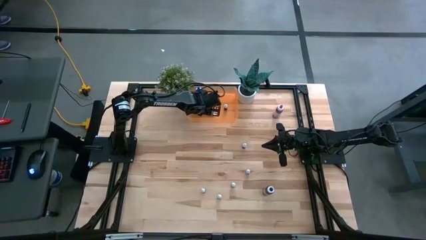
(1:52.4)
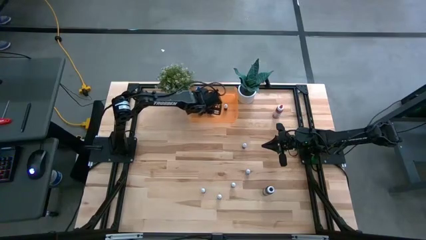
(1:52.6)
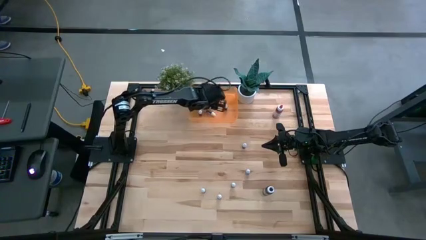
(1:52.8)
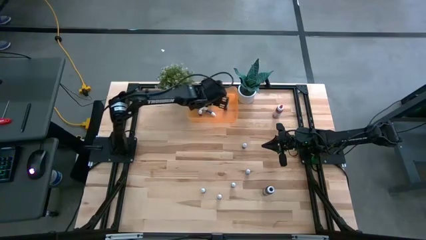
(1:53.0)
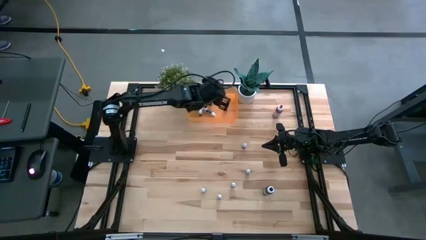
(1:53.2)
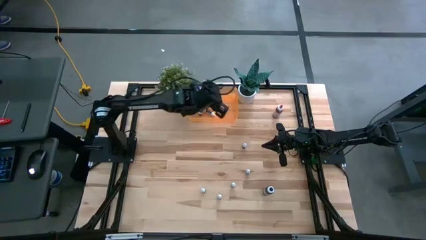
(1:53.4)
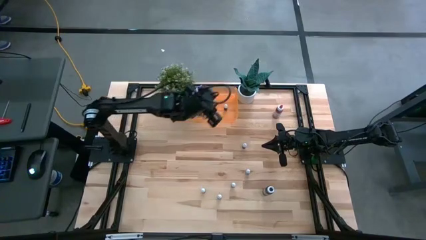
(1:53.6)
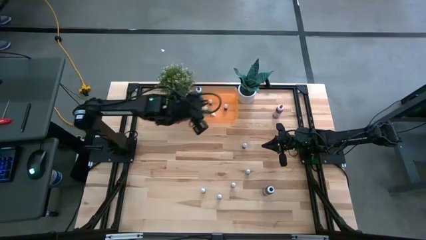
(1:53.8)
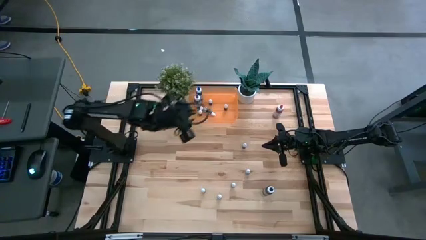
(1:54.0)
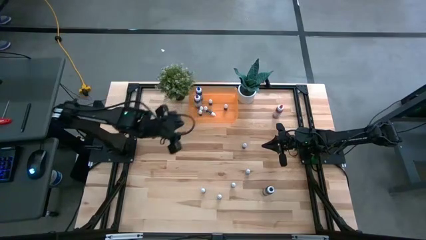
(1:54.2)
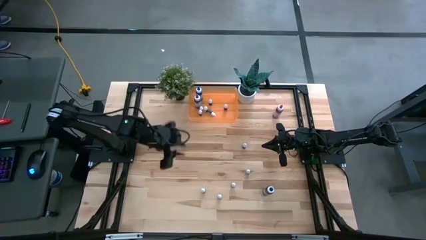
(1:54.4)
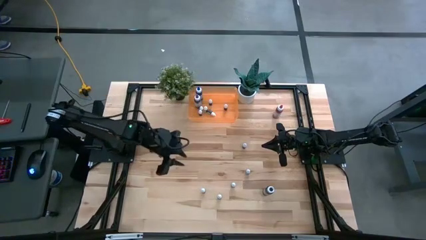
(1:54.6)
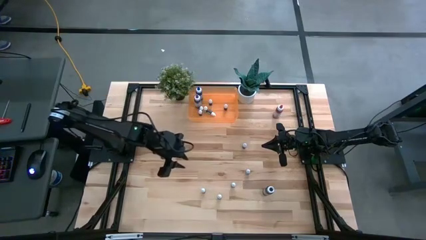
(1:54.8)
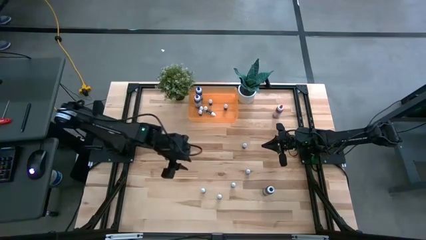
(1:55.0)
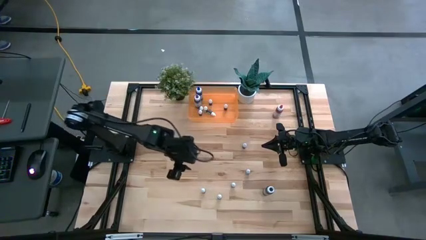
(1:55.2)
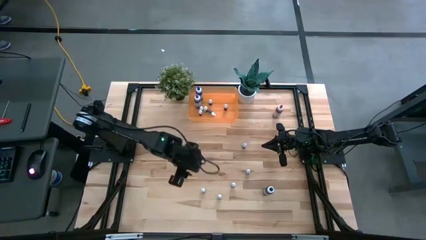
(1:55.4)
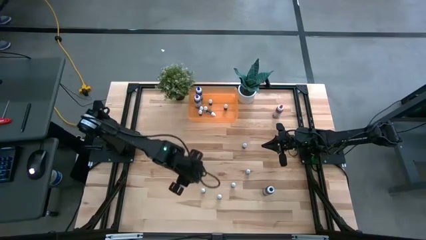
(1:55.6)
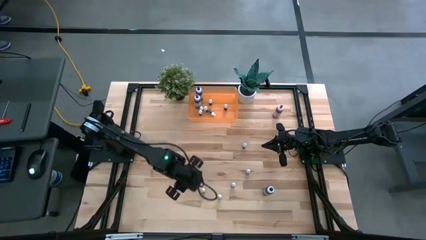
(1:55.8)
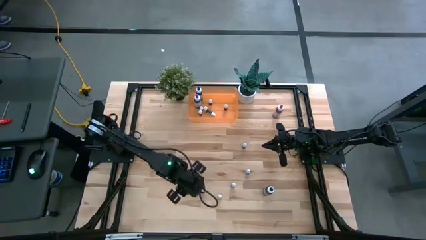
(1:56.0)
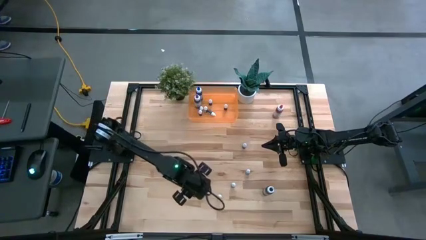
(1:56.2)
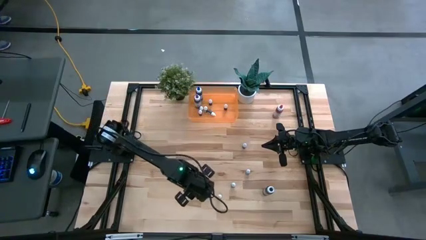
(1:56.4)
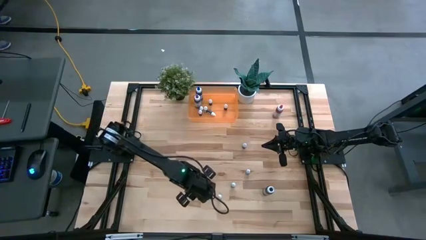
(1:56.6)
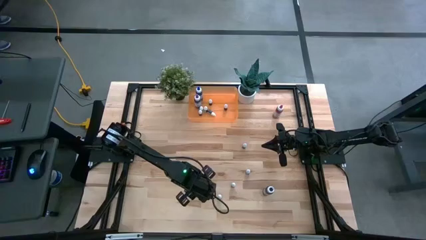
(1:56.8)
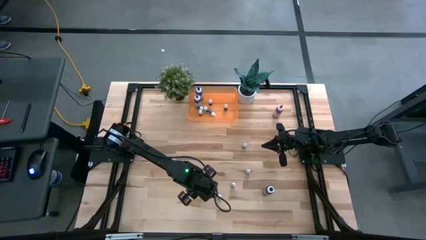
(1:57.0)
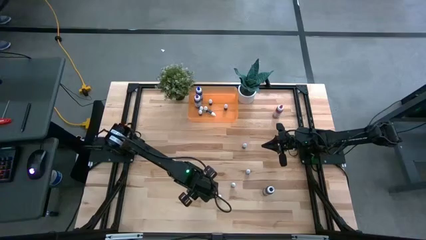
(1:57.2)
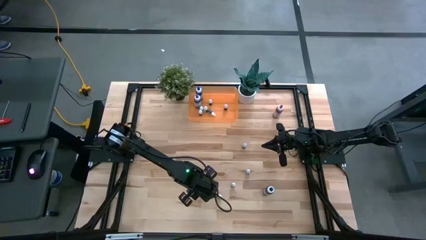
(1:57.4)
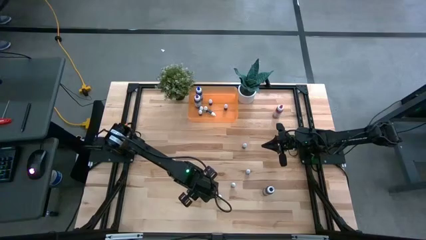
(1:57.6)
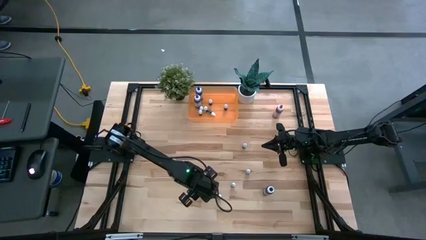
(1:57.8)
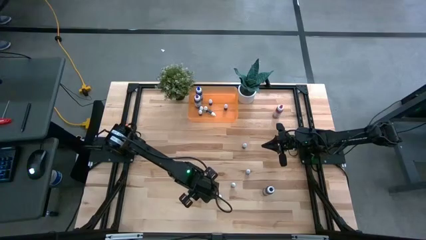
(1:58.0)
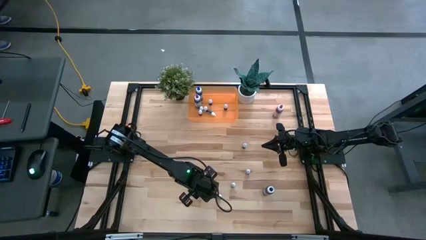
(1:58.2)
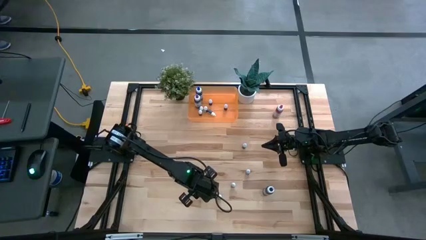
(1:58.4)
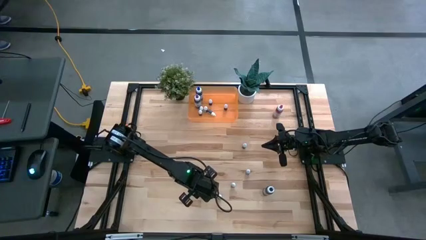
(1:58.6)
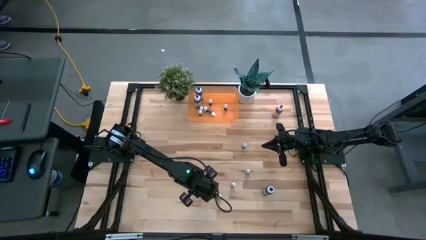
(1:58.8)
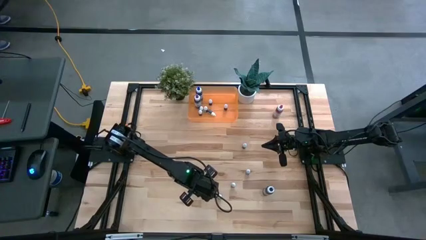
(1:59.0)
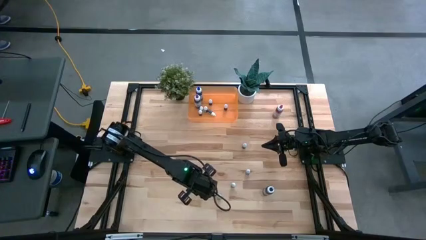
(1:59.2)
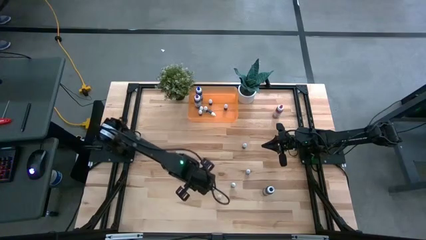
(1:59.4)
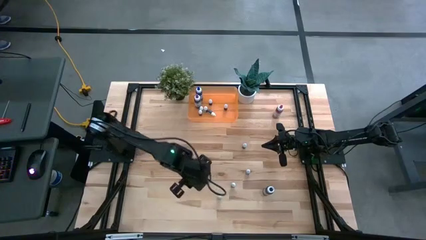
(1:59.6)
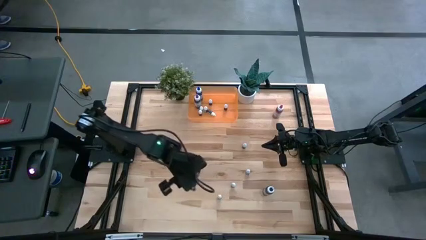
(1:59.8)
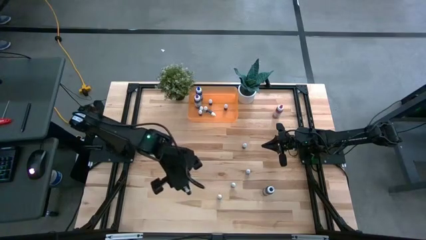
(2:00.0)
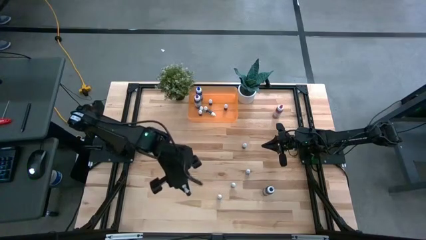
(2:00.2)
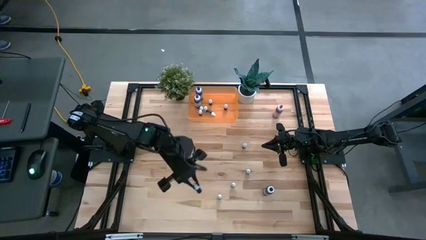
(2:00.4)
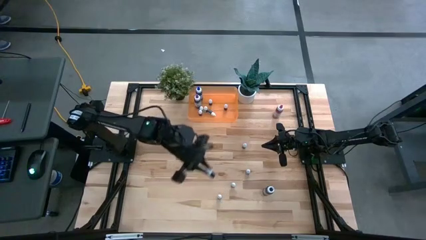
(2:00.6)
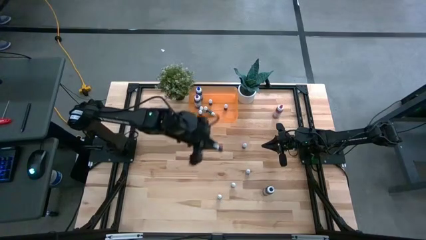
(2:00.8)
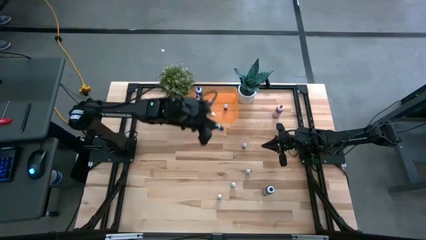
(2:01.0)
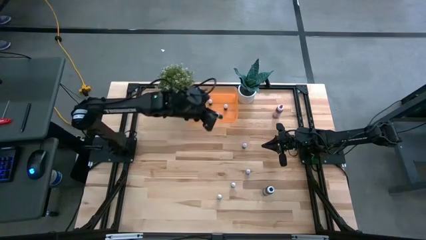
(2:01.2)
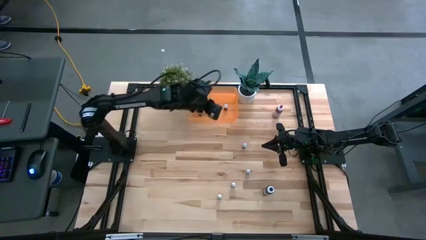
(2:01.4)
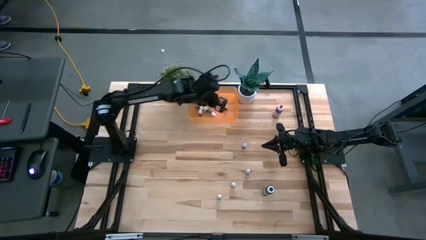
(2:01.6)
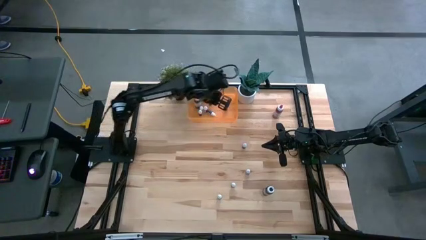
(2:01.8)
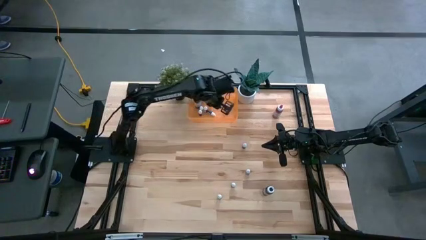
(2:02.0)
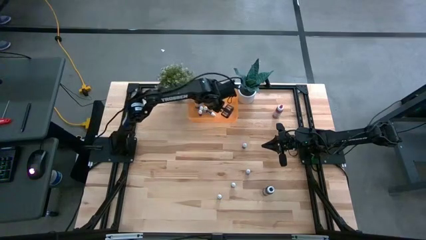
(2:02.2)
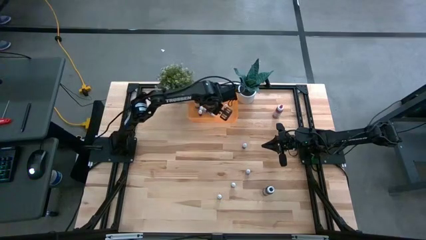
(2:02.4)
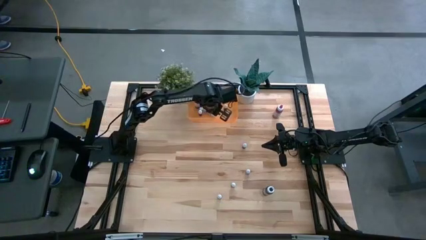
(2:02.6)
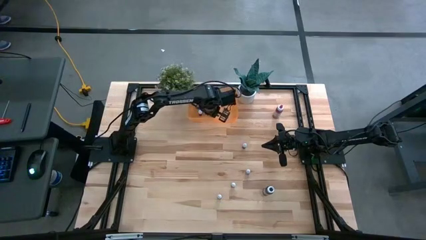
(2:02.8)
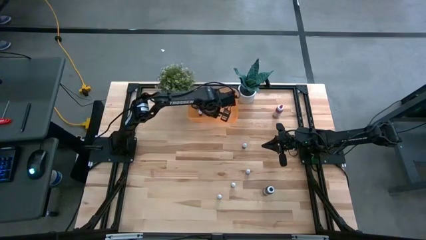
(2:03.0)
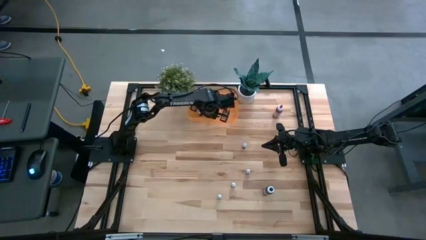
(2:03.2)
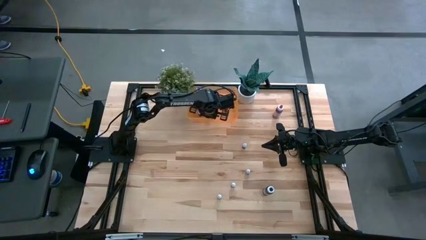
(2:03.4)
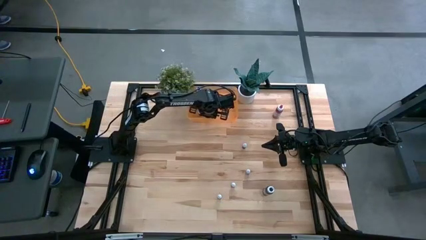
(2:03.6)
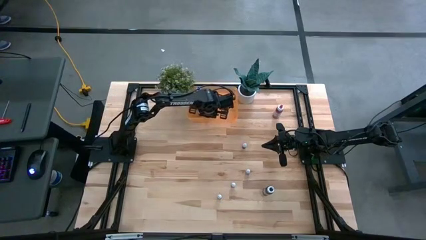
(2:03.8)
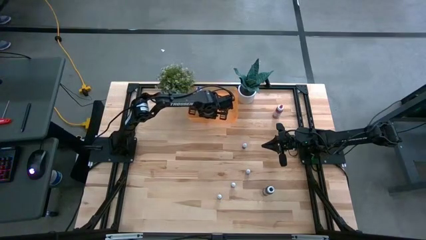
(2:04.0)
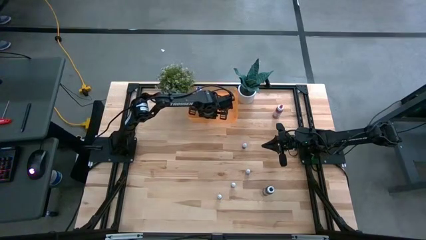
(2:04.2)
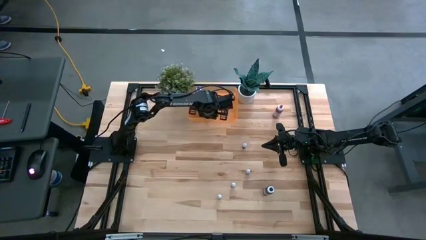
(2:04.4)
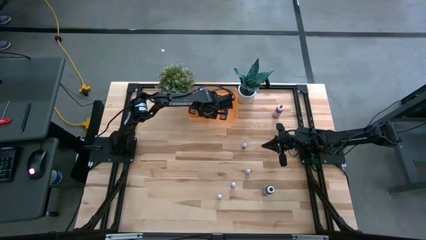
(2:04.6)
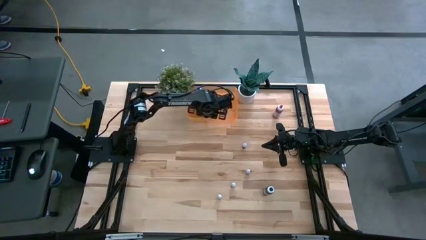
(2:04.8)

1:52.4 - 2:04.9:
Task: Pick & Place food coloring
Put the small blue bottle into the bin

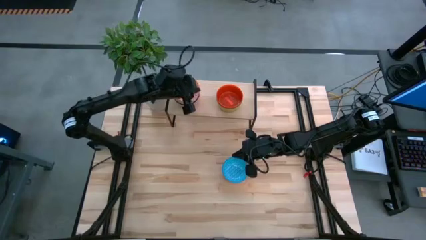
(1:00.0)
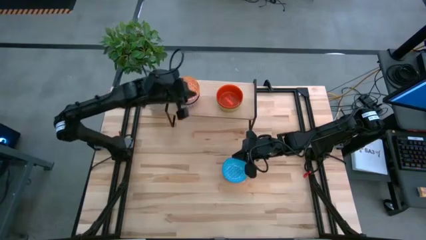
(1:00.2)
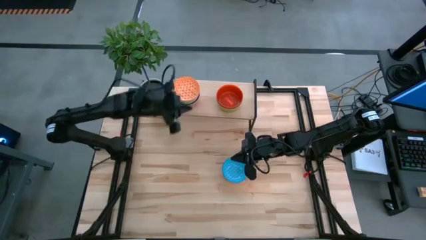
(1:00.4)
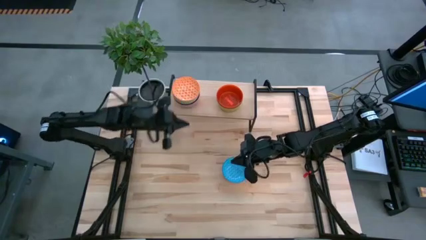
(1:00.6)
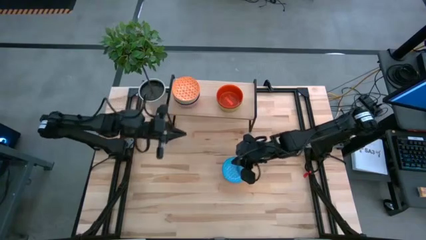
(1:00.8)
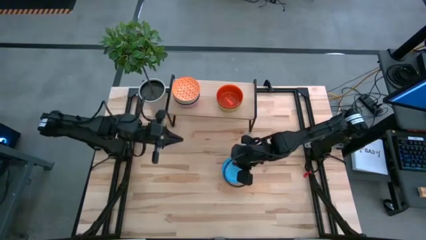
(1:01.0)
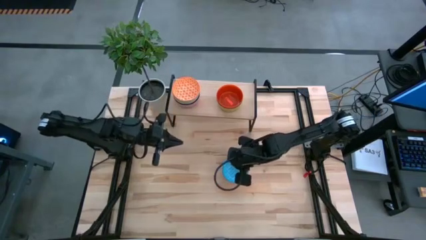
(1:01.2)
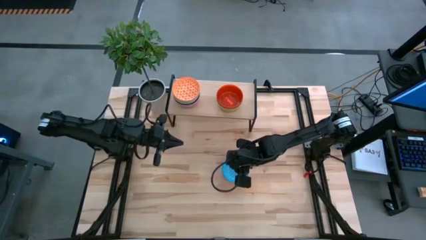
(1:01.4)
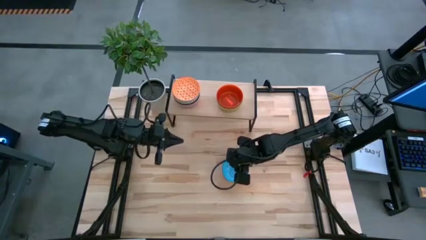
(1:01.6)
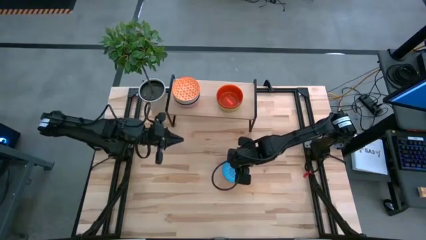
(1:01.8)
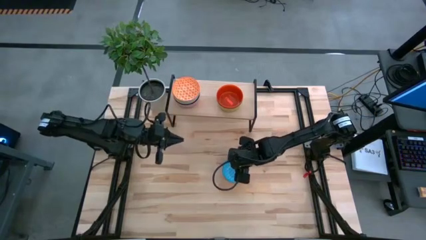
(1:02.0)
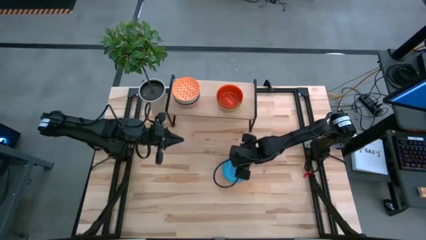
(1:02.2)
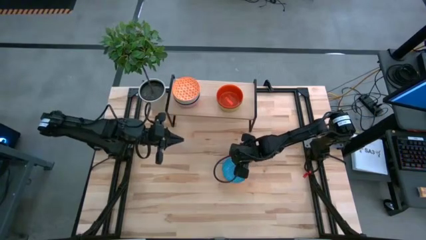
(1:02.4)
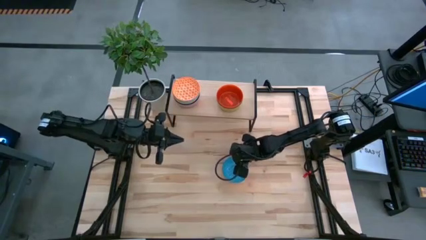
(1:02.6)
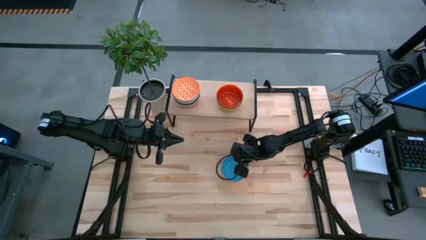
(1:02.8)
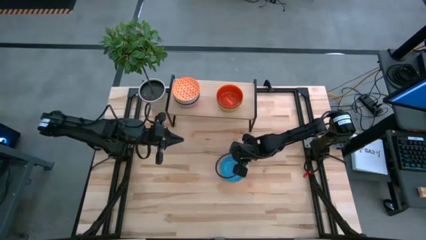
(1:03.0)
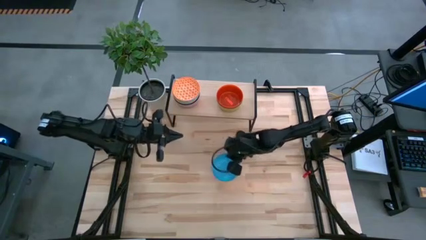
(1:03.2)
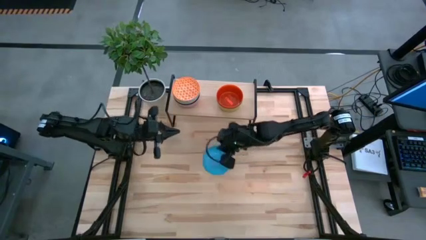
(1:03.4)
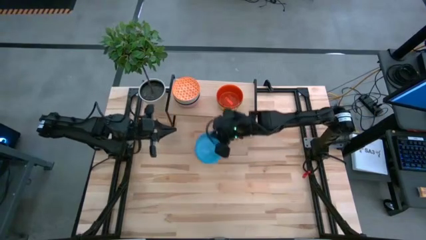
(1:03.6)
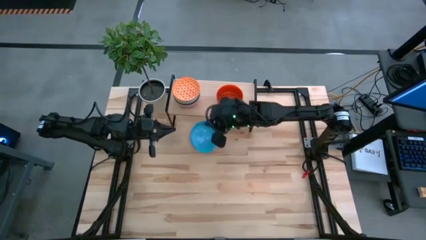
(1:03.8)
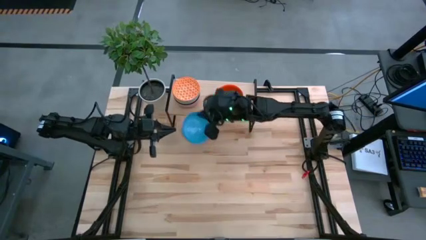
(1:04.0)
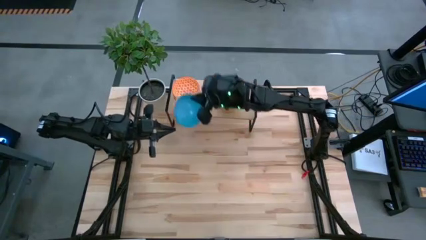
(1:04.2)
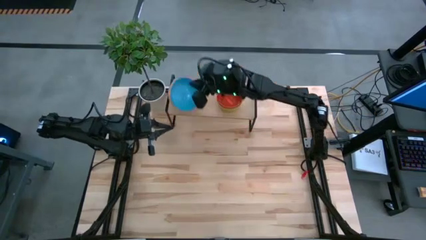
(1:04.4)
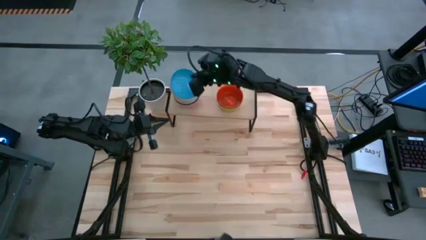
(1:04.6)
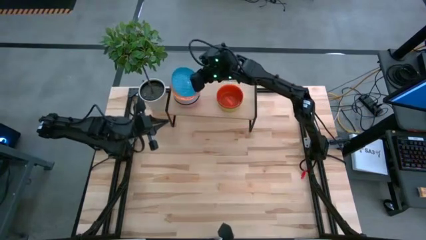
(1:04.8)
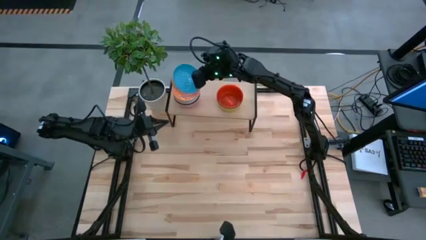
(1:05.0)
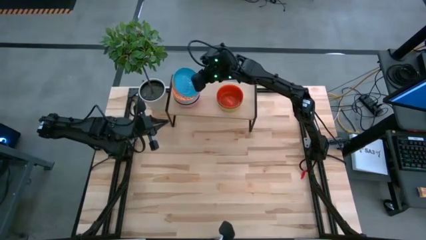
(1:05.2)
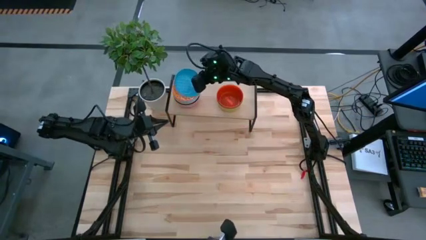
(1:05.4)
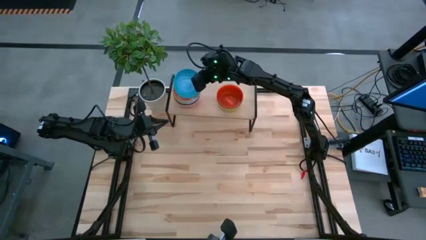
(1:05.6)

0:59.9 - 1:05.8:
Task: Place and stack bowls onto a shelf
Stack the blue orange bowl into the orange blue bowl on the shelf
